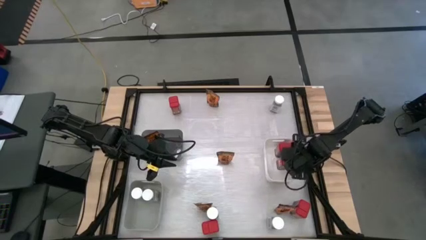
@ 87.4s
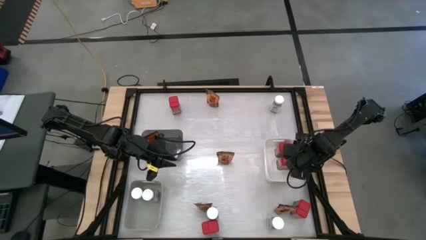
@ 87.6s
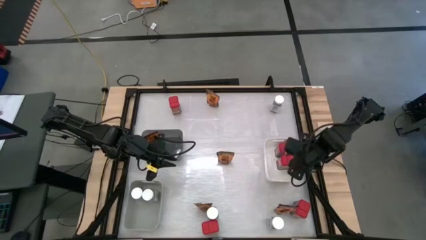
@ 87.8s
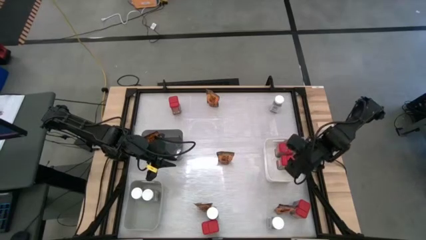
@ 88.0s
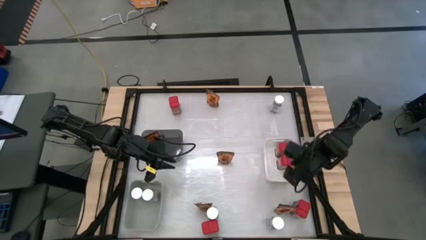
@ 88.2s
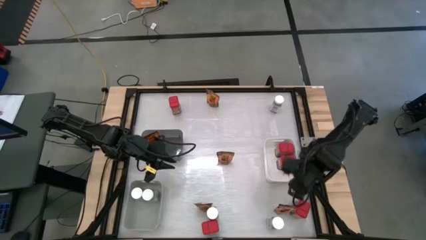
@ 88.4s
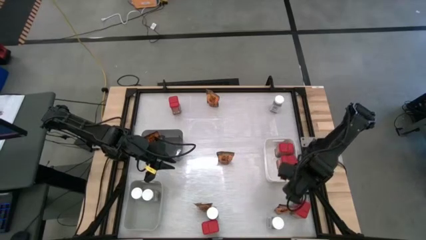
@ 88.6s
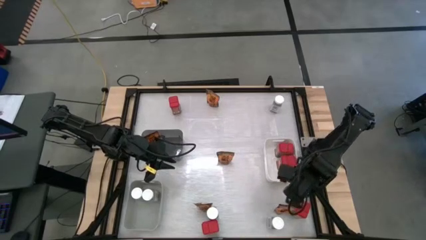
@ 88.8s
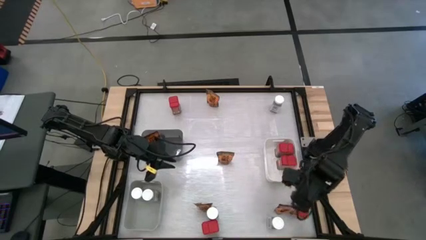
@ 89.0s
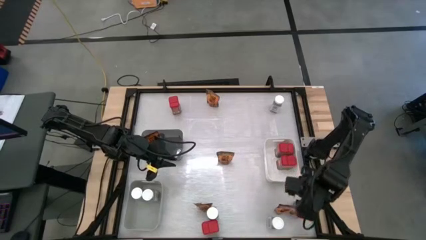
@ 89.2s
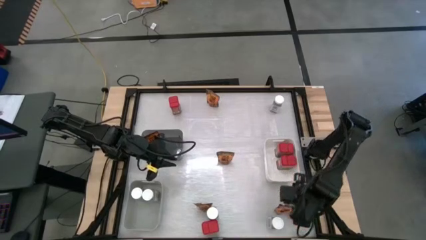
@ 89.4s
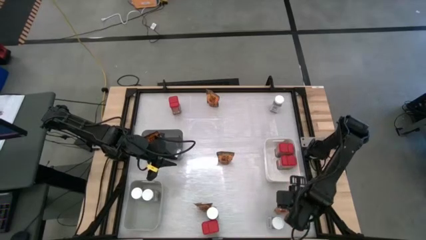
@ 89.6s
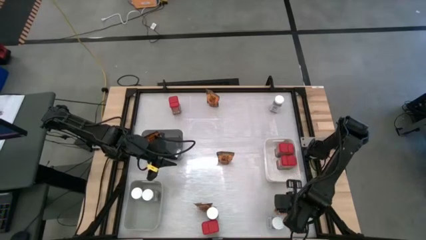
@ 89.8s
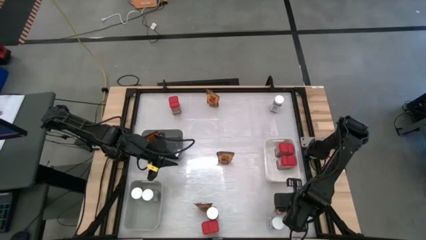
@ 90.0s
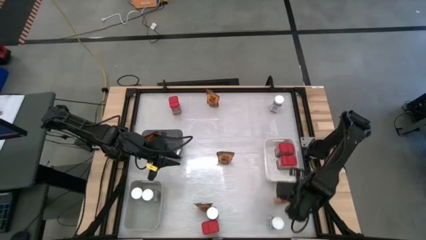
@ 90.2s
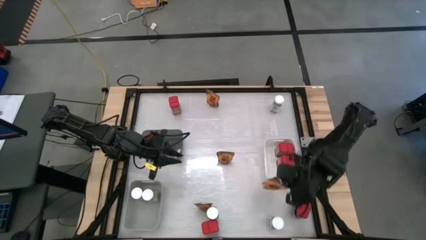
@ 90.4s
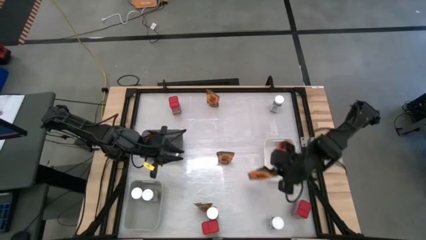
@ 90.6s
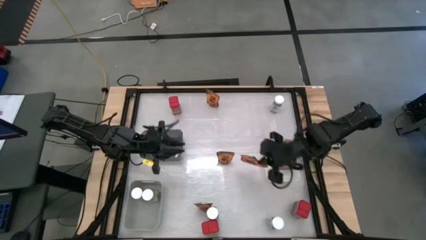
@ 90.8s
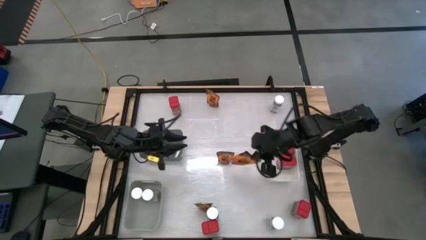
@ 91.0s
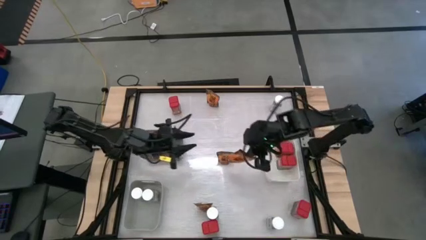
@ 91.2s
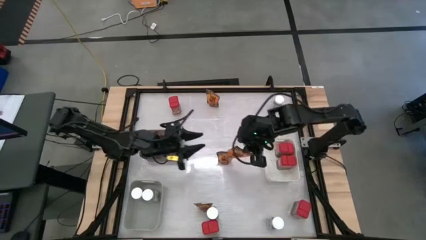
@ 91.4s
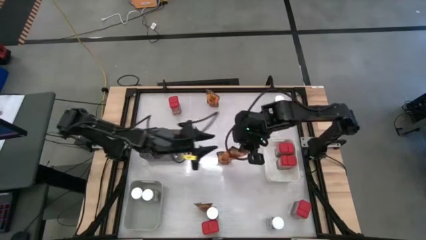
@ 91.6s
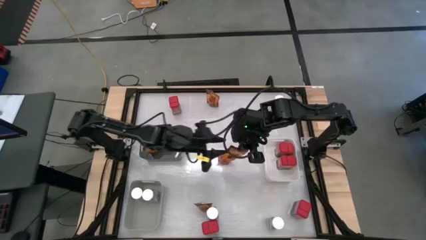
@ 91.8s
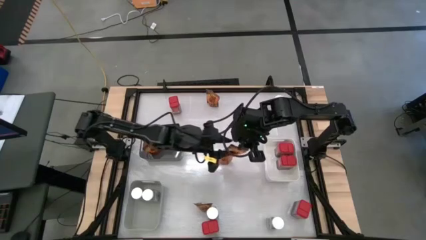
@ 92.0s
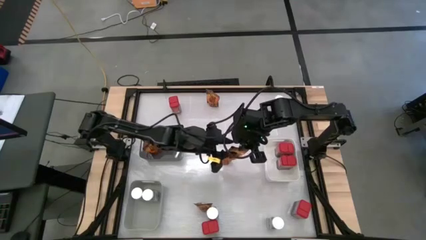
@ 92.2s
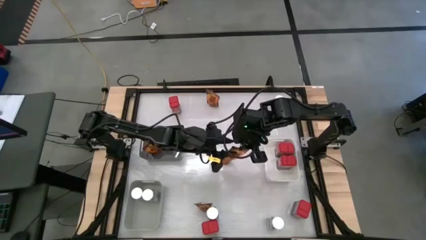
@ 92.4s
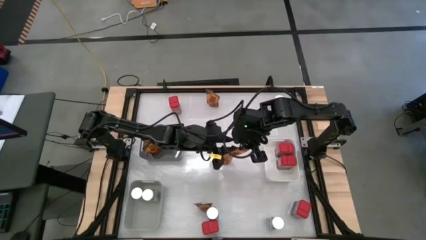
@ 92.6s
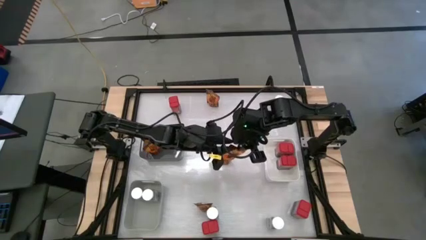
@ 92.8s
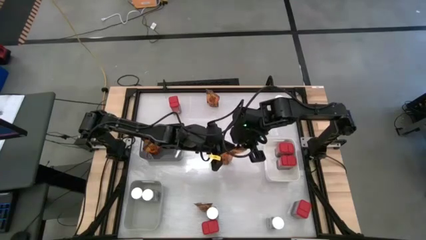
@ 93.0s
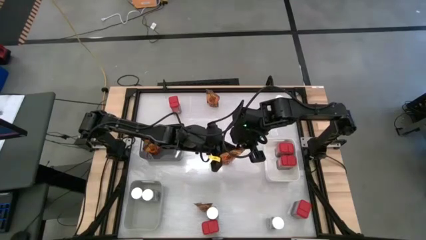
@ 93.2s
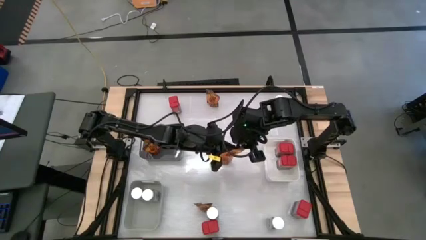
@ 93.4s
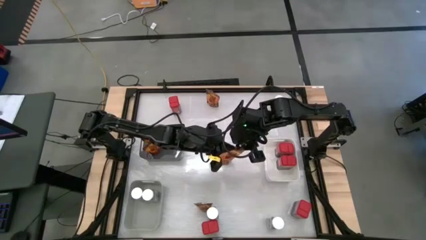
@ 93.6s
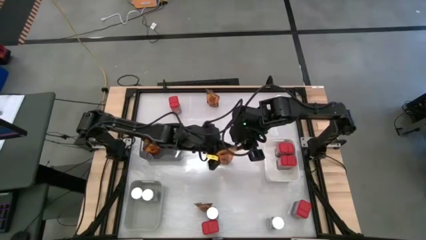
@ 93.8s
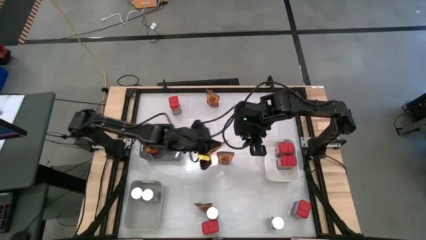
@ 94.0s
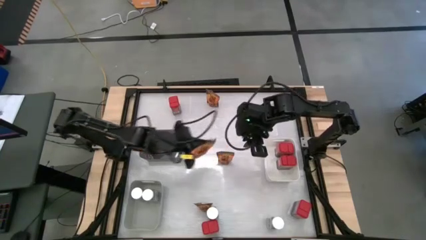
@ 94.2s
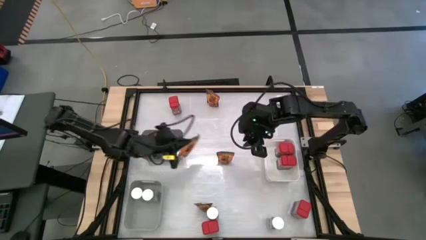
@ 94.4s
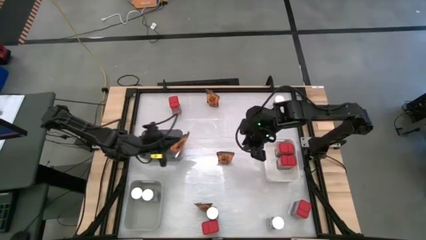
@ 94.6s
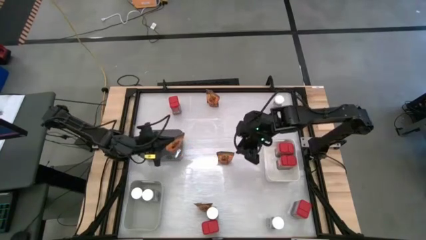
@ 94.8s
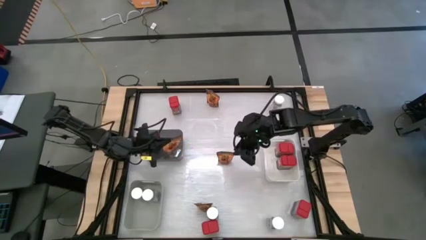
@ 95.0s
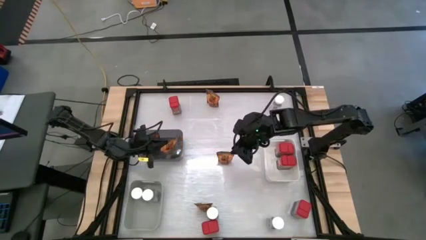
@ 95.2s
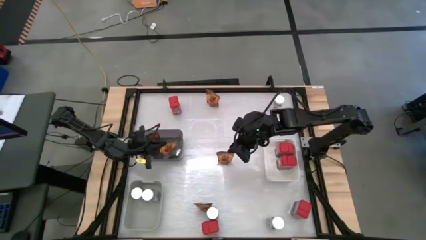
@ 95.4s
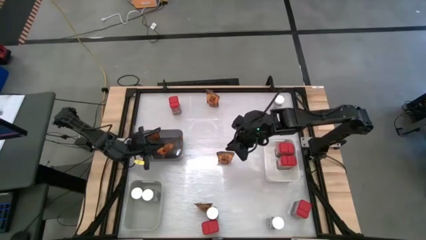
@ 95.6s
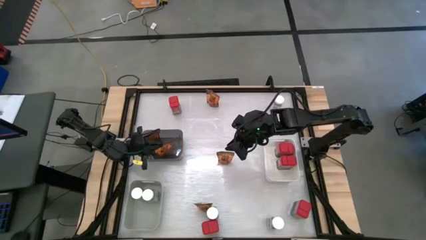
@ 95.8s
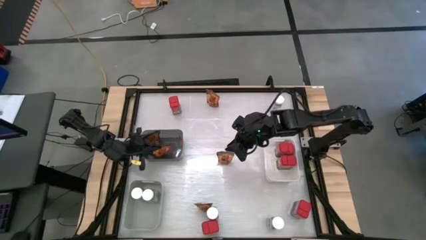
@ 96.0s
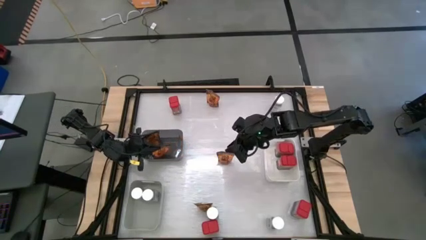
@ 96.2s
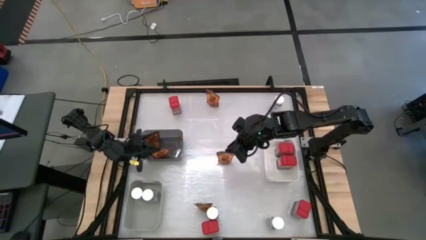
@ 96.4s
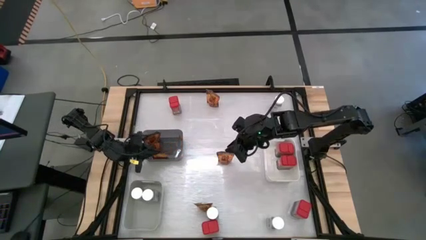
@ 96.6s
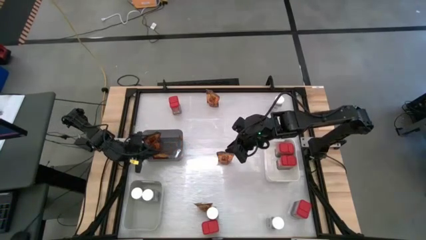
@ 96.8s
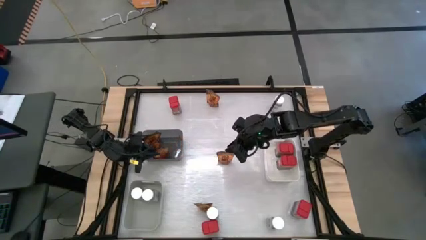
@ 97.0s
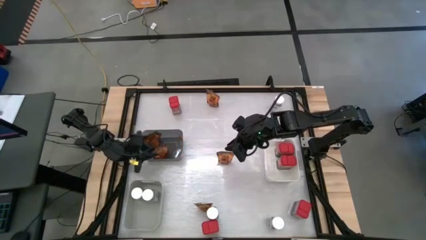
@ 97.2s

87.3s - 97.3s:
Task: Sort spices by type
Put the orange spice pack into the black bin
